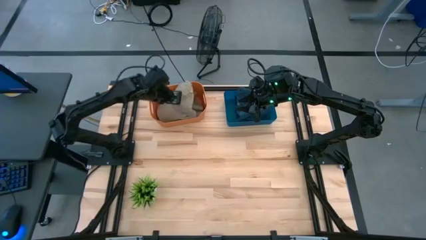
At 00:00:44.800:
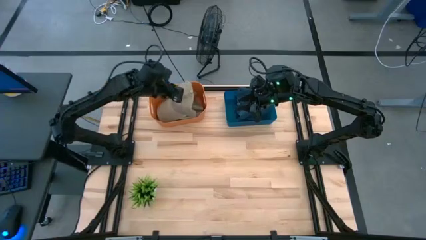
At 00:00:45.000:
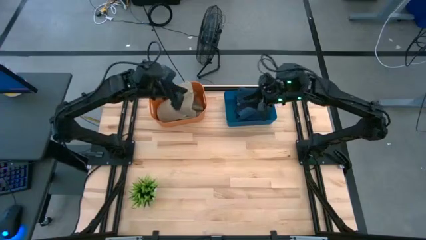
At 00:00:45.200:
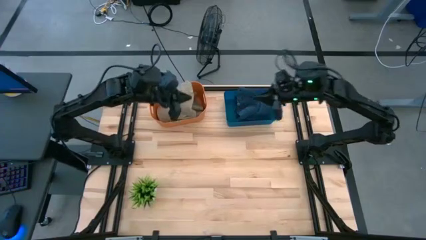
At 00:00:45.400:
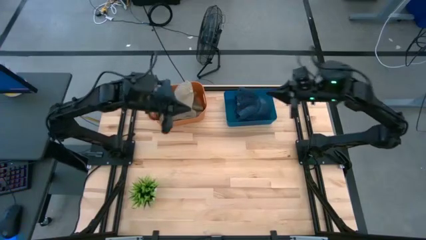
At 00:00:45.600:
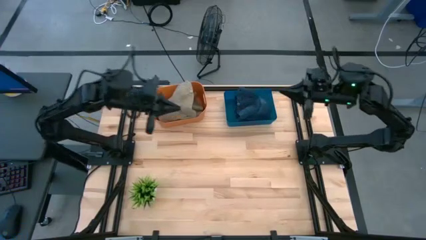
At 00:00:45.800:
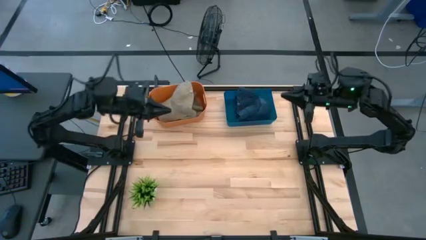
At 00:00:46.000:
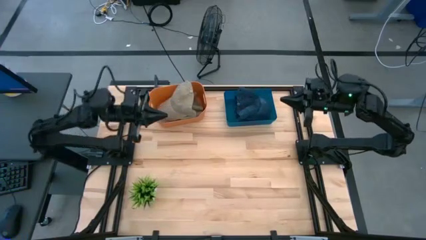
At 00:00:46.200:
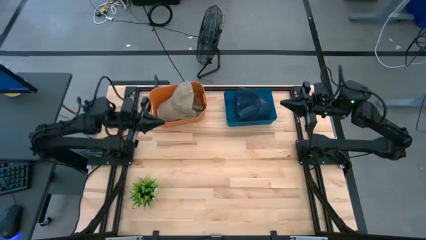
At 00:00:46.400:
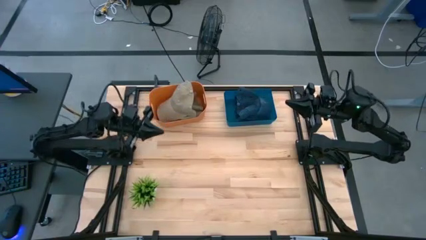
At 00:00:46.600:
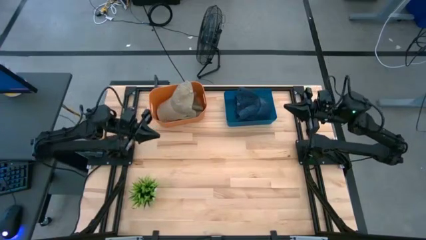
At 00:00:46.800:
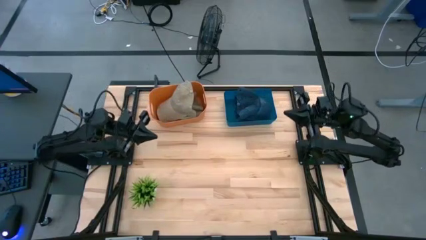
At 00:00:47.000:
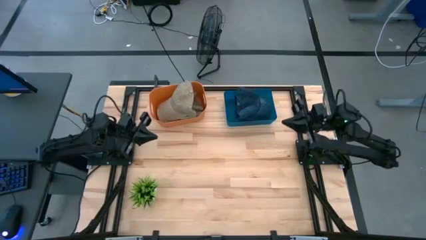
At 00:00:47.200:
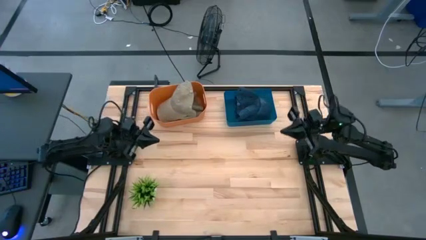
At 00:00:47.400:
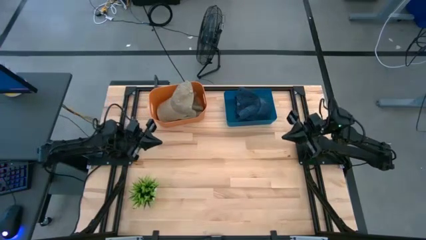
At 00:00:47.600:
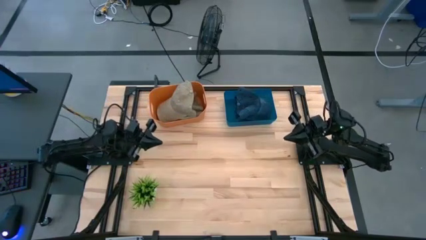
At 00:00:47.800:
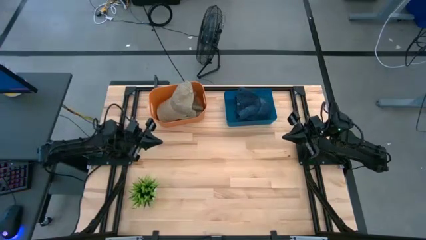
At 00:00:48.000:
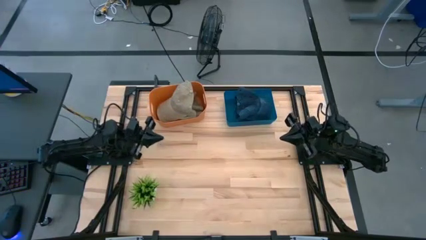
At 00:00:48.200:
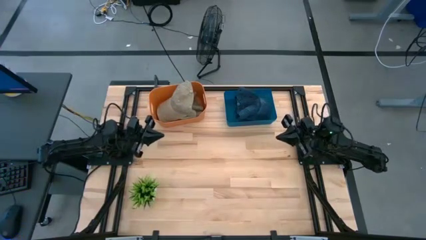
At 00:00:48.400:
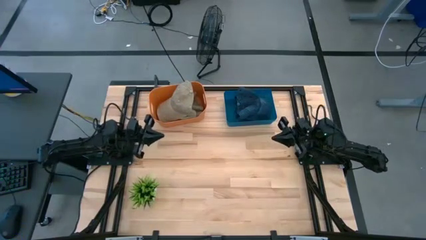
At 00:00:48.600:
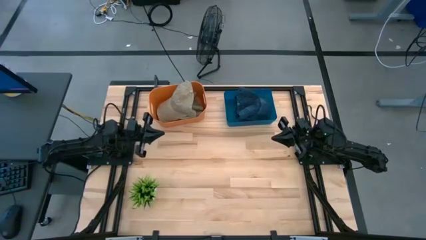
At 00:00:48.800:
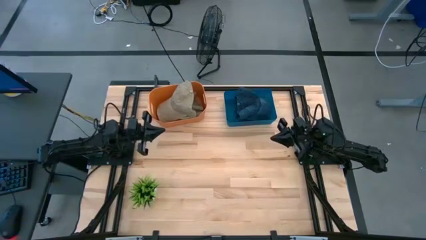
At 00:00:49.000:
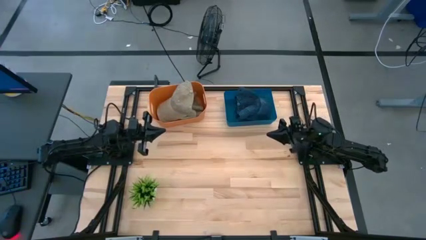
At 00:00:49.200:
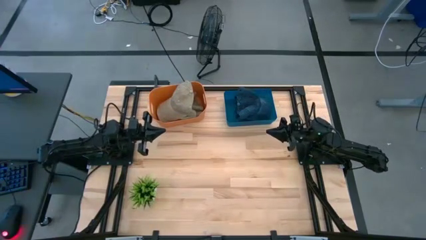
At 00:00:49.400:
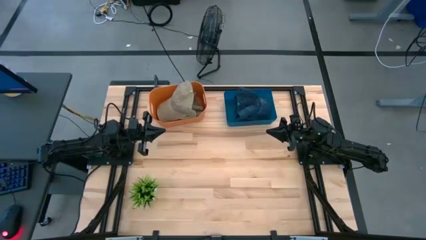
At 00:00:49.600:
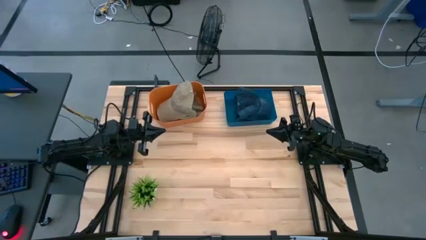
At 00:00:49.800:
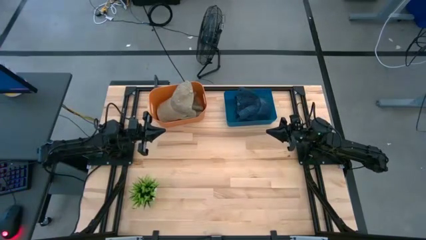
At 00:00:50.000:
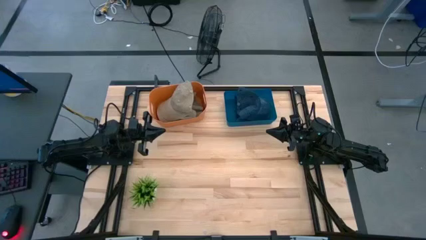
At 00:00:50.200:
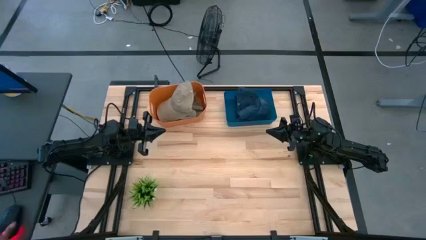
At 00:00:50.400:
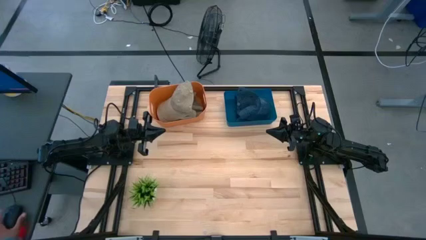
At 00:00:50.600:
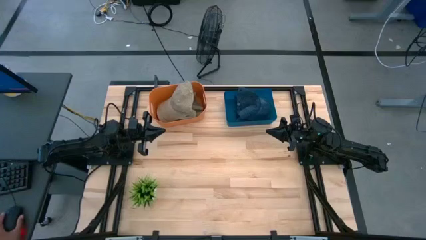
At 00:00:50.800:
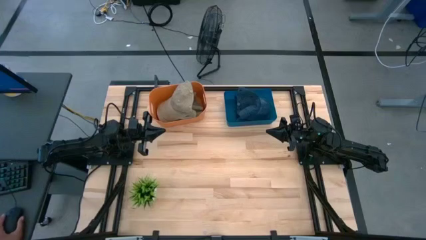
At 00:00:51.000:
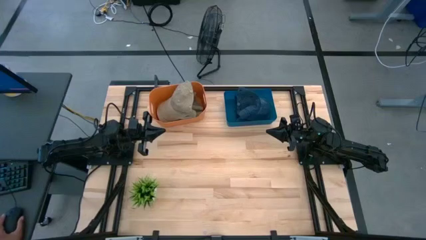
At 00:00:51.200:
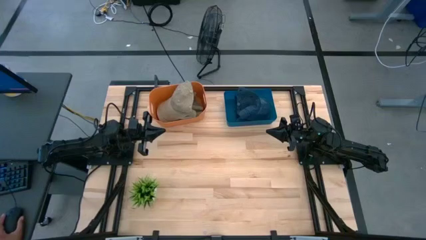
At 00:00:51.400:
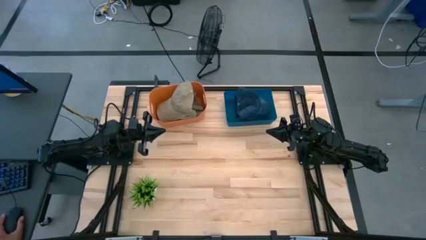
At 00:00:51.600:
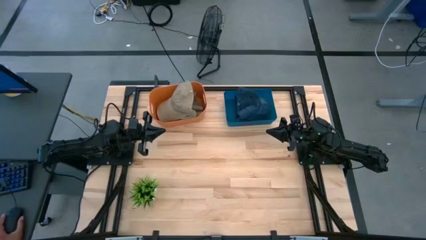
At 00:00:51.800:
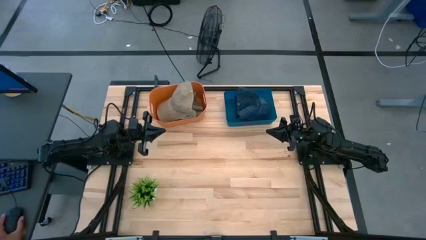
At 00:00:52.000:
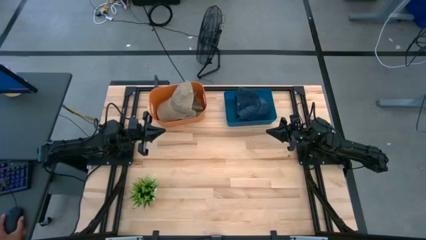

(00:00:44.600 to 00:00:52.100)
Task: Pick & Place hat
Return to Home Position

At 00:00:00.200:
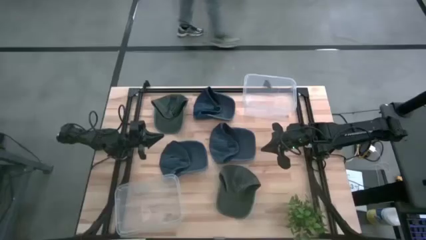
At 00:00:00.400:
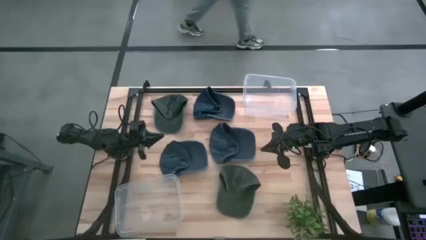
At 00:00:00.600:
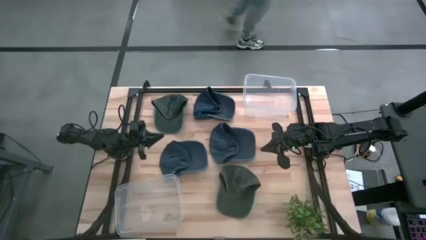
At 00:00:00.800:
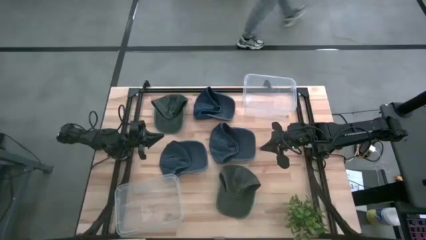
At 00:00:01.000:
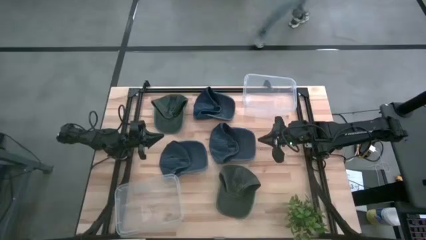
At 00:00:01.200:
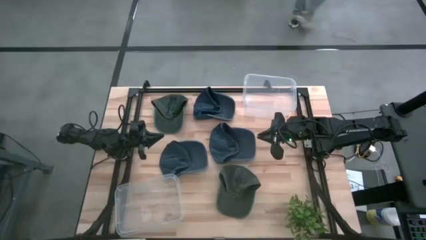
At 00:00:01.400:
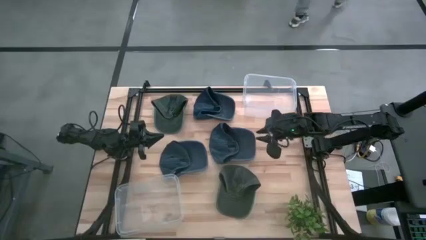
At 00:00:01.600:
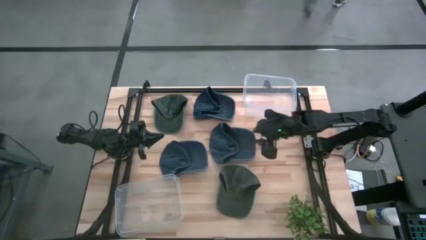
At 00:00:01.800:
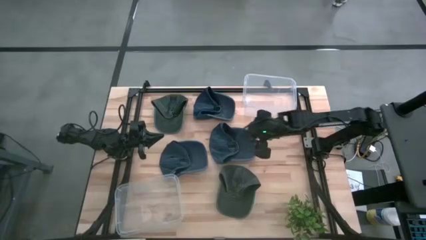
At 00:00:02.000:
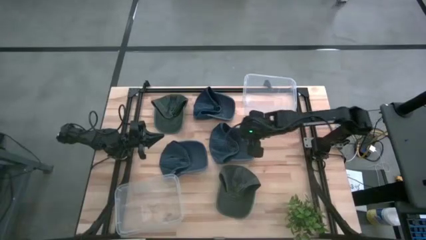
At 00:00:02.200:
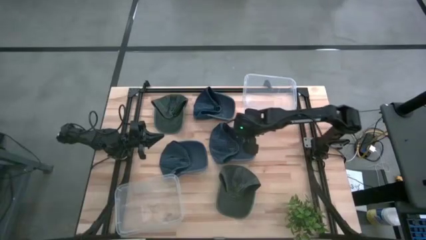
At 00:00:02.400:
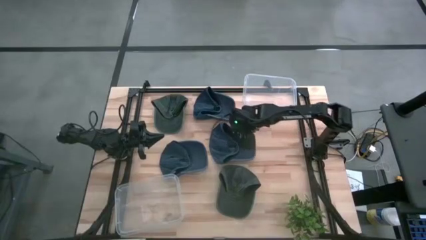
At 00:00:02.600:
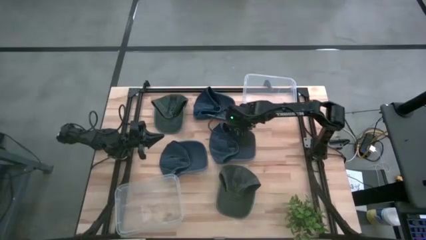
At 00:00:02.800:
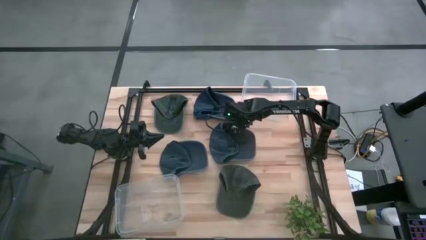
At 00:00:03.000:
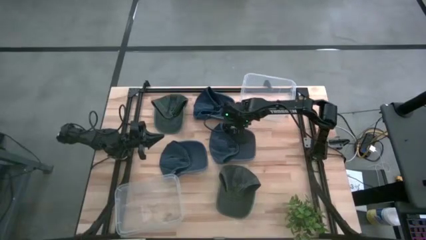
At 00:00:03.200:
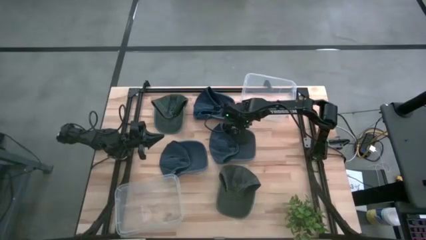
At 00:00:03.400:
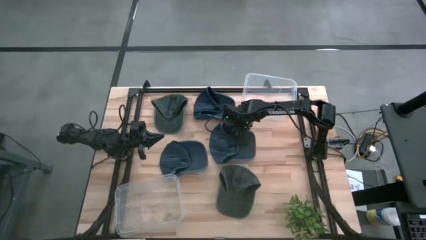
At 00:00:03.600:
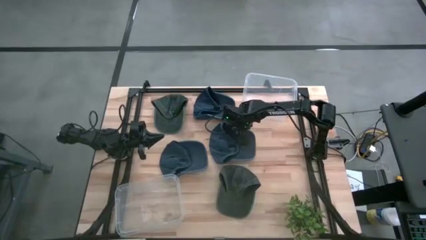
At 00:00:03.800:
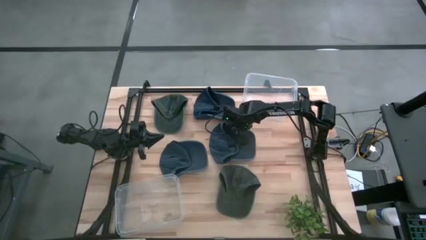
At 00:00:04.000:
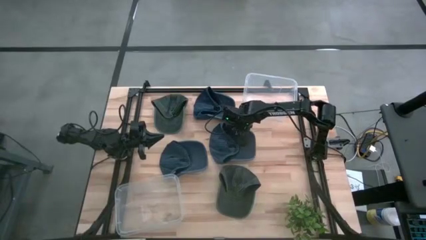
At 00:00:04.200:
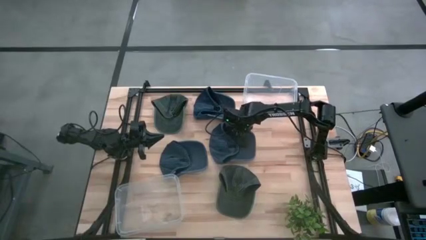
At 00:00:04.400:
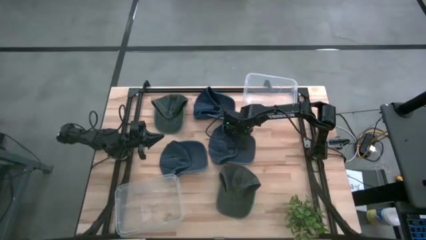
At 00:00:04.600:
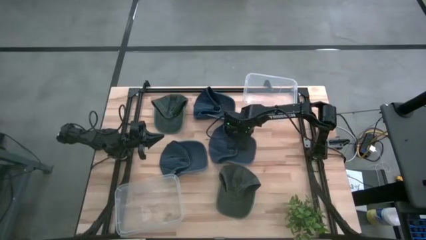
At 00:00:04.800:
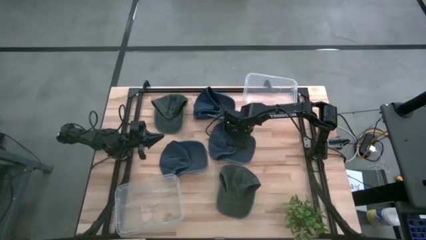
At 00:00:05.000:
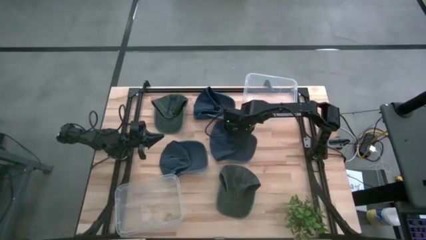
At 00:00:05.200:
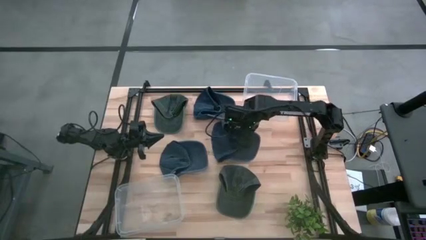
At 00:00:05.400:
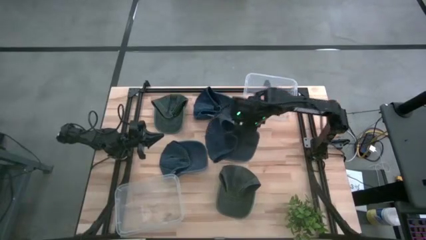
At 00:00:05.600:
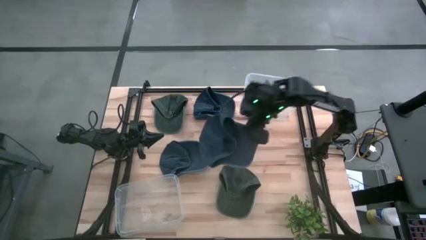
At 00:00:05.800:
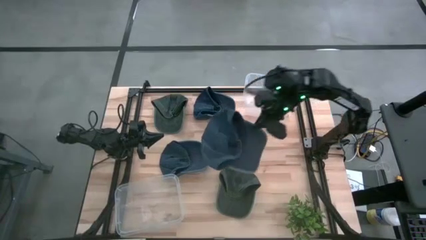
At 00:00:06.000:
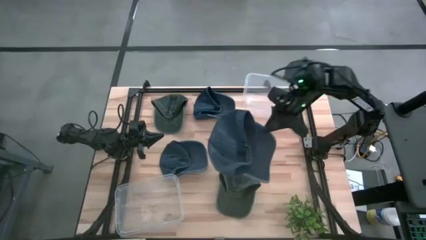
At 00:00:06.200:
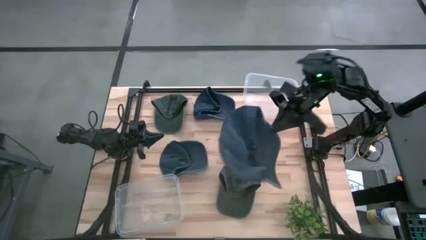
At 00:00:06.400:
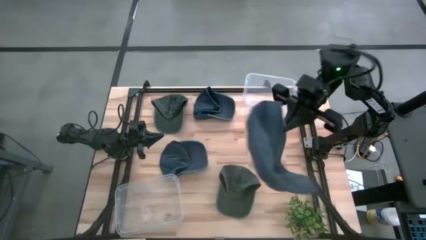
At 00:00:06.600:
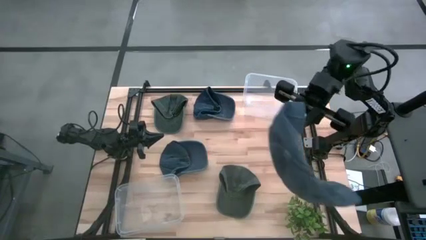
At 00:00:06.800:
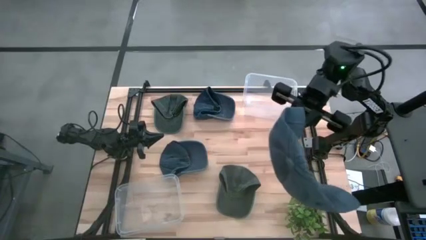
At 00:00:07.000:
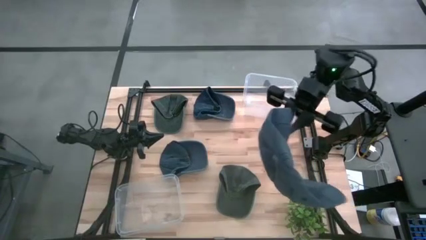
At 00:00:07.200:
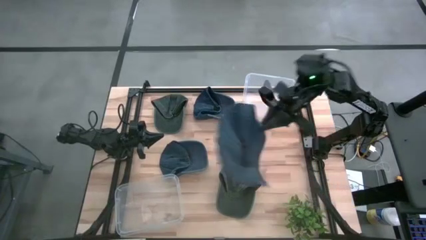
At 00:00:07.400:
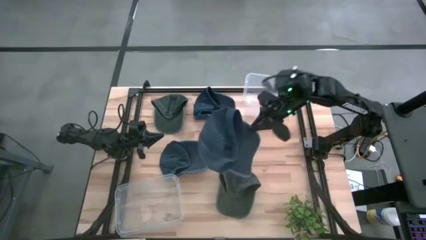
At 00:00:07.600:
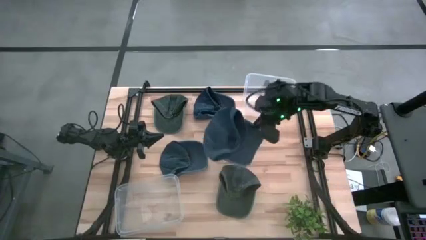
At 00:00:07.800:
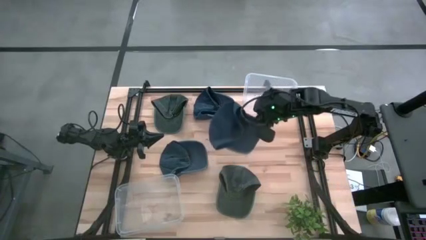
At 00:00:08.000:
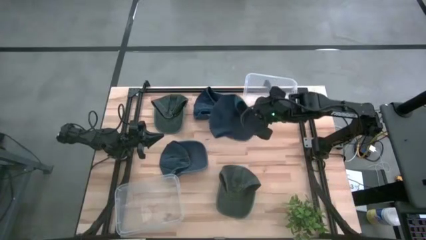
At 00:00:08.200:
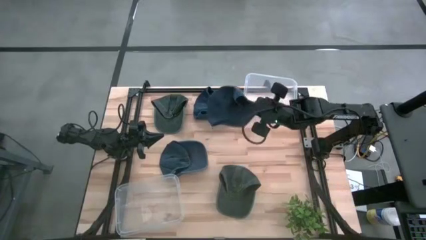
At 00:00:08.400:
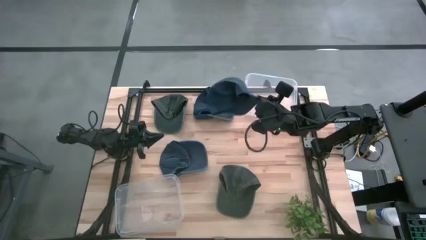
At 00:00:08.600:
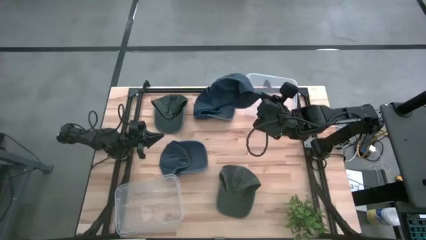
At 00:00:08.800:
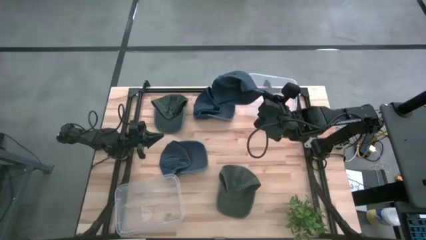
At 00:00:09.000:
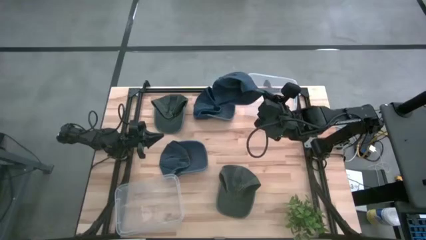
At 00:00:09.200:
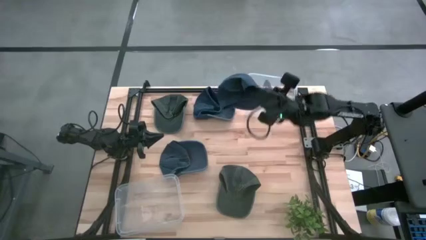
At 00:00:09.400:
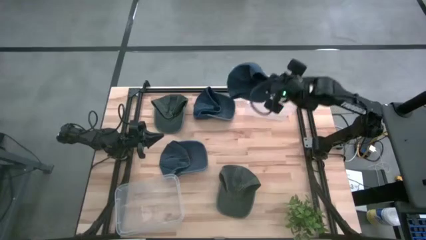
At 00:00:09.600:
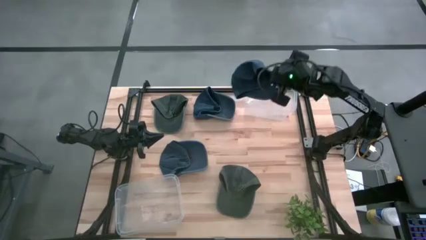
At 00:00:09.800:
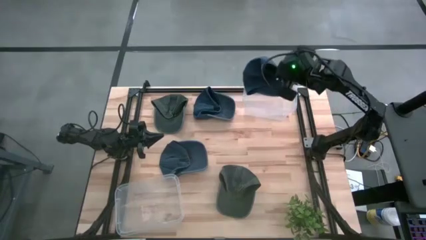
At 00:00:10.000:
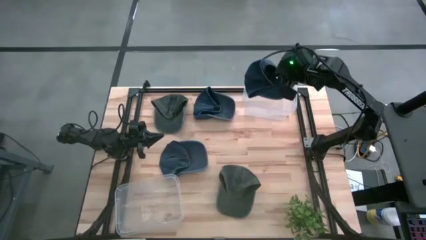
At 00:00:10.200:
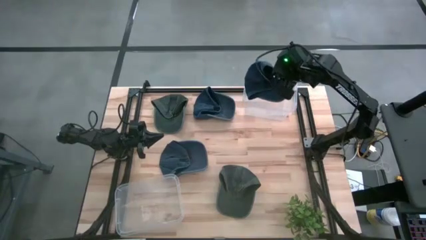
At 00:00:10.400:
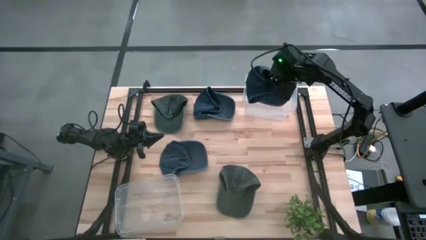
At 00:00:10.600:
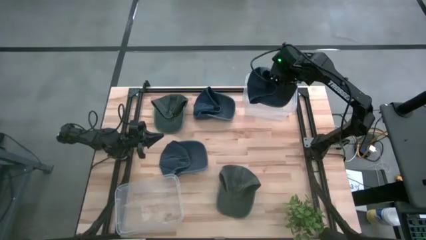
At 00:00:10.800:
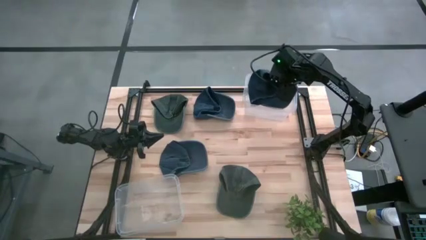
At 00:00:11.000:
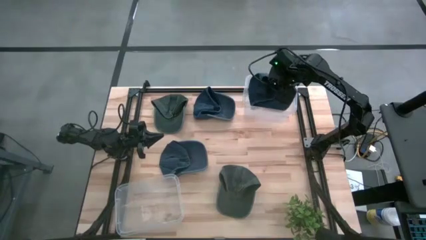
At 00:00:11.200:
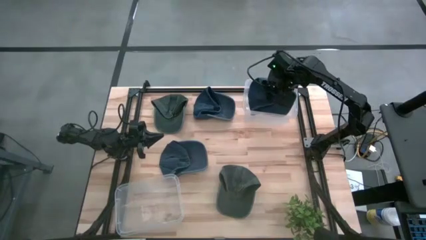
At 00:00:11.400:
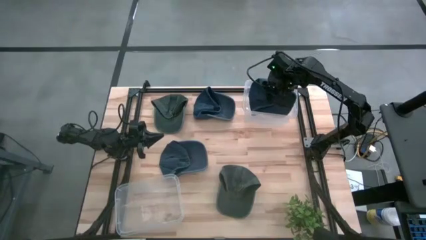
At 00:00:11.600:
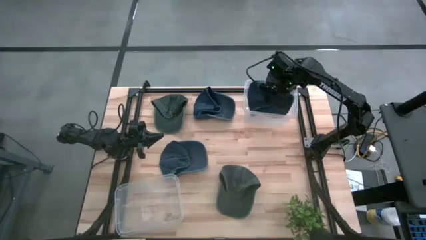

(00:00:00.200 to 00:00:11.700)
Task: Pick & Place hat
Put the bottom right blue cap into the top transparent bin
